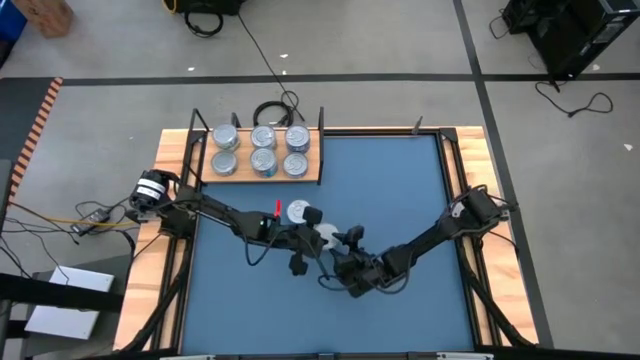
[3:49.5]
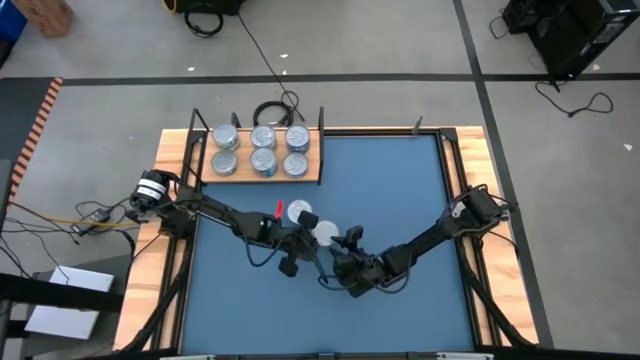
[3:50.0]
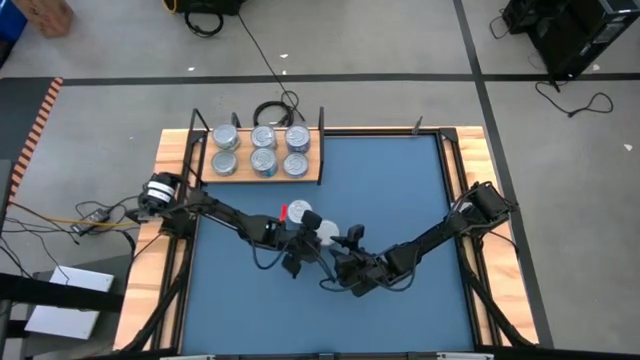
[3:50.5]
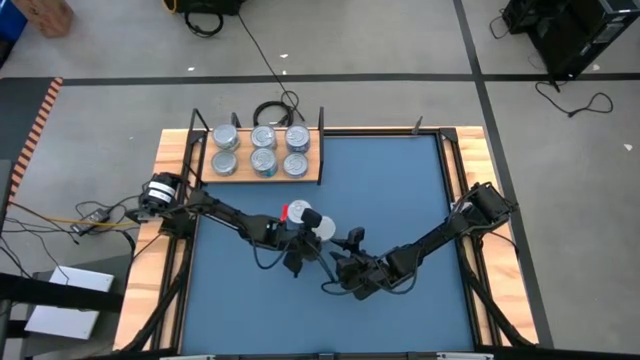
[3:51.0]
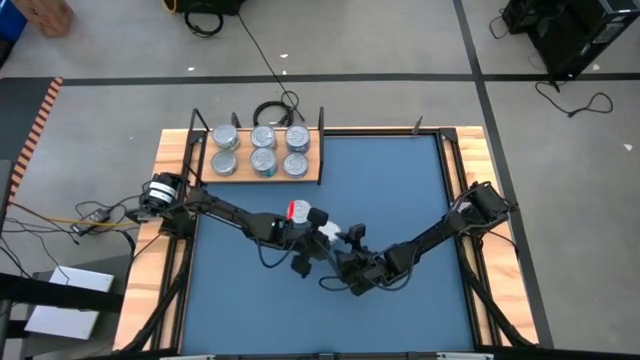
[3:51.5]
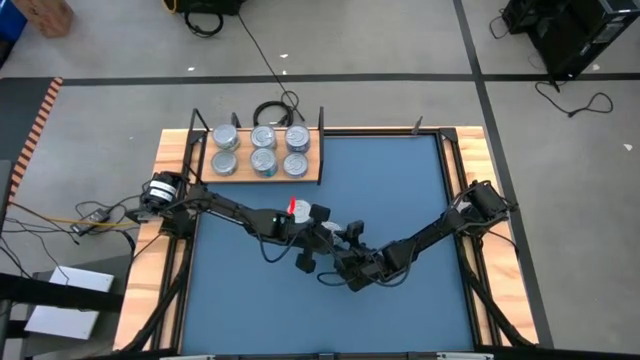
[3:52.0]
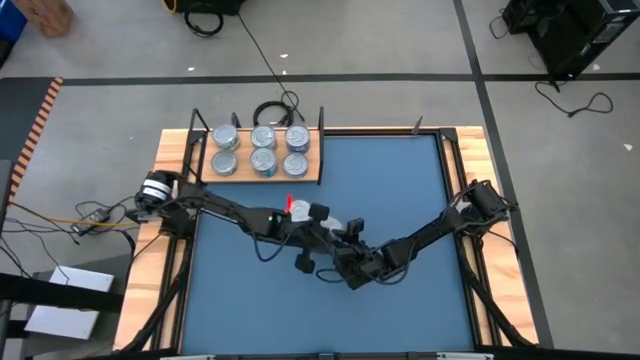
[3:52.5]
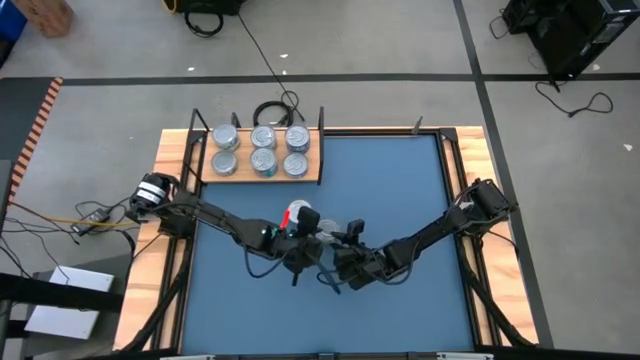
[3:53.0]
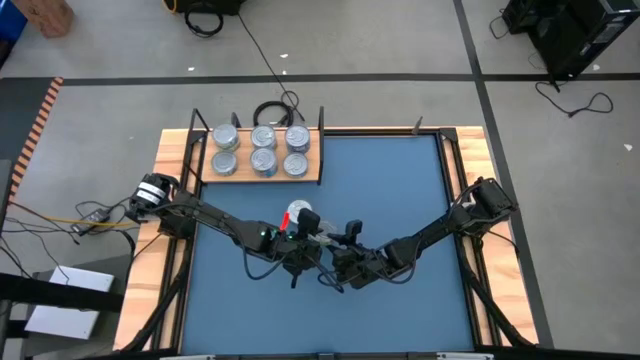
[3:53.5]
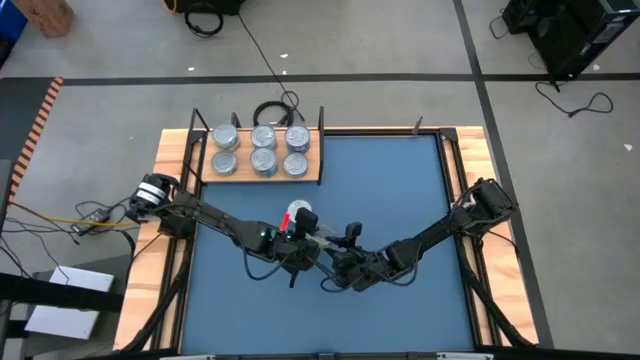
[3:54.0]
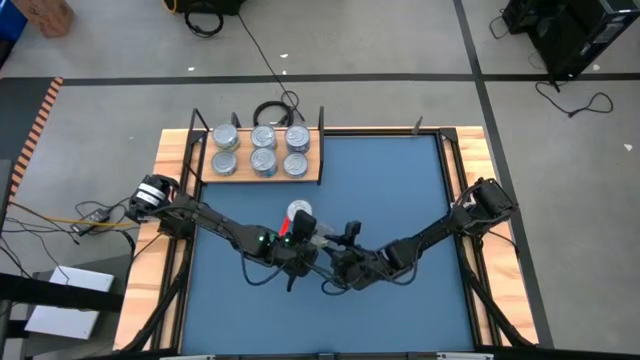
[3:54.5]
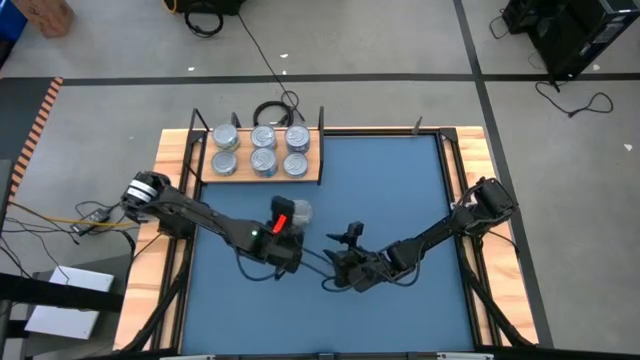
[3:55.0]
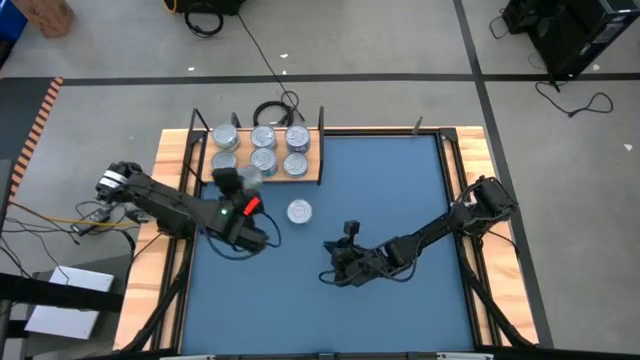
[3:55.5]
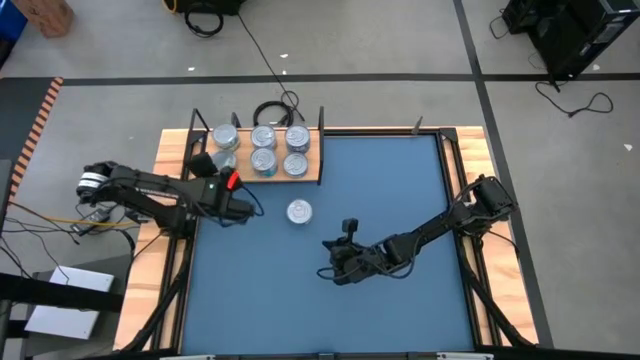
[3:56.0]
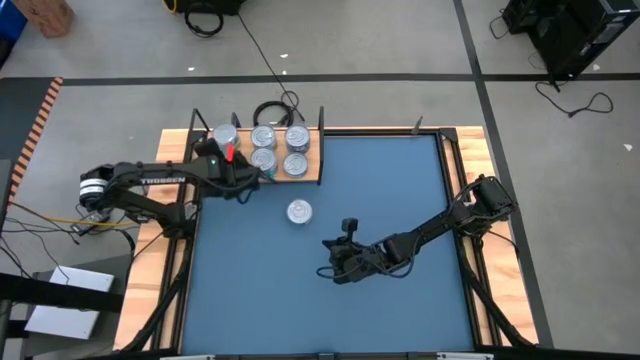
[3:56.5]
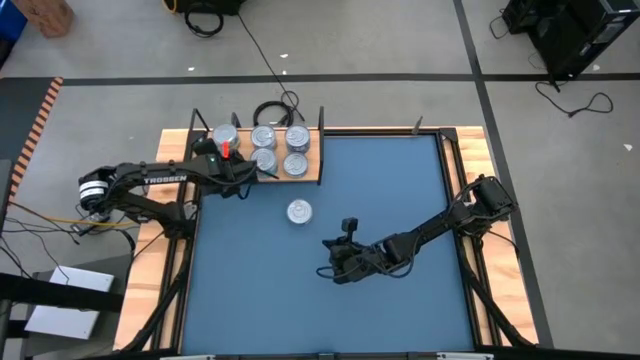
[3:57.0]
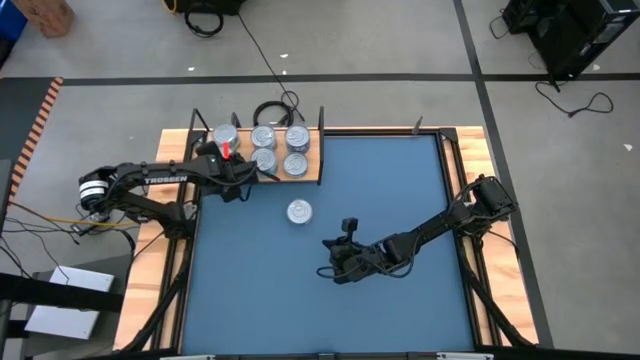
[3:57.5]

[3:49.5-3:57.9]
Task: Stack canned seafood by type on shelf
Stack the green tuna can on top of the other green tuna can on the shelf

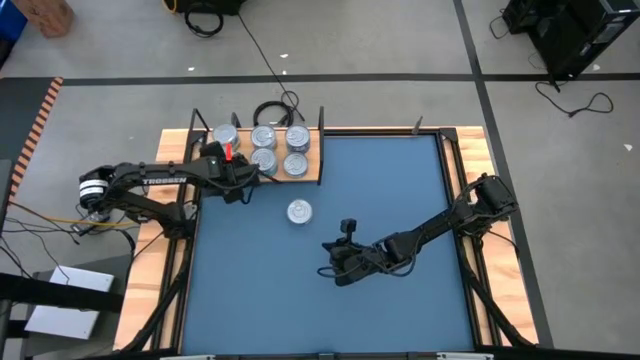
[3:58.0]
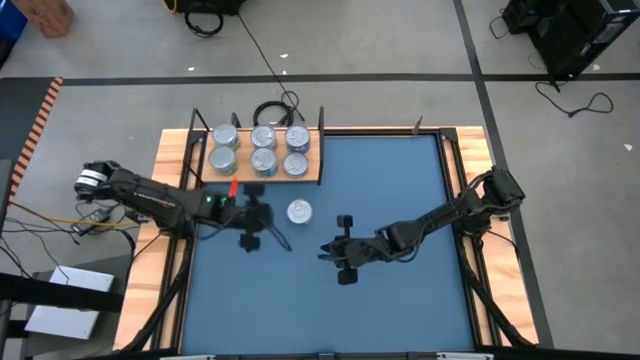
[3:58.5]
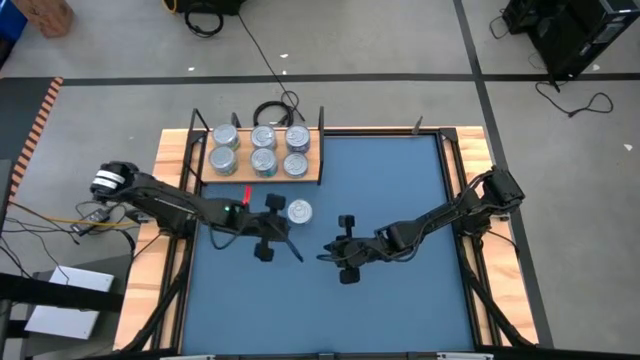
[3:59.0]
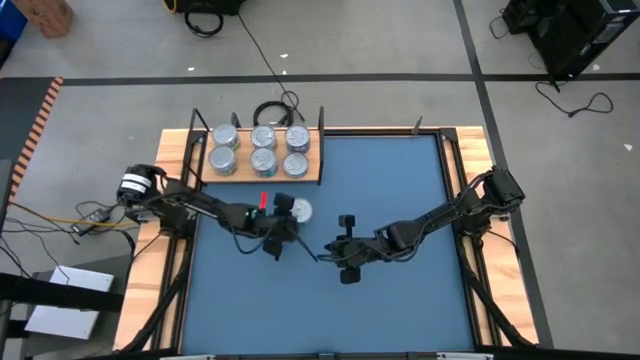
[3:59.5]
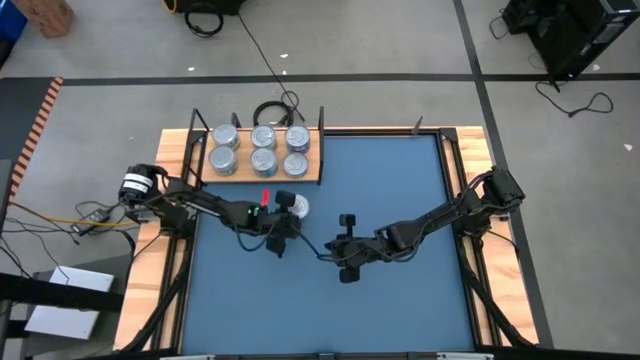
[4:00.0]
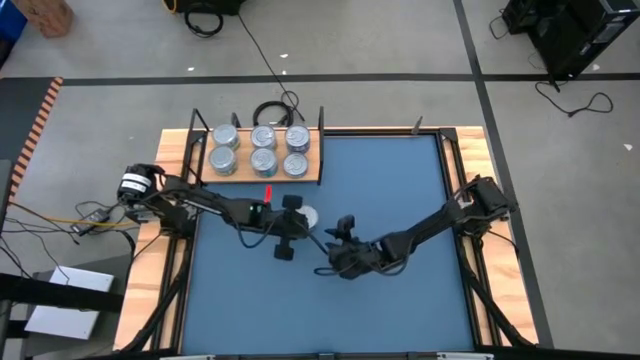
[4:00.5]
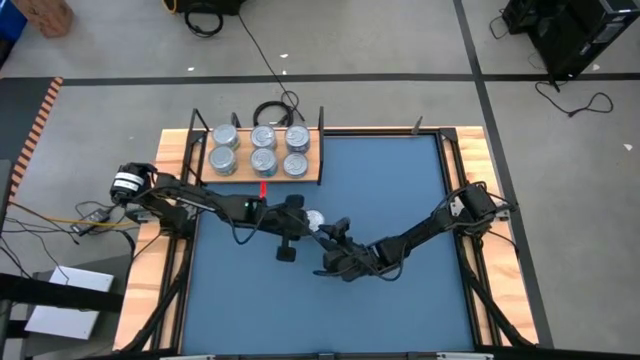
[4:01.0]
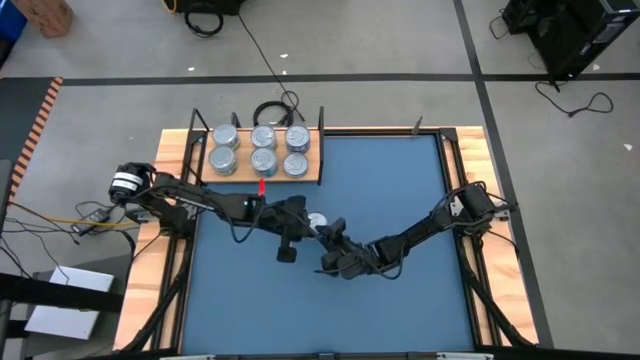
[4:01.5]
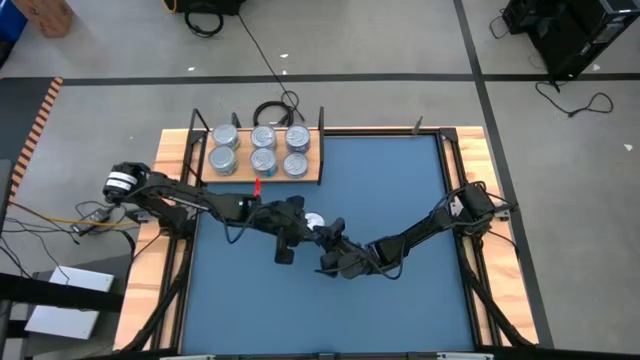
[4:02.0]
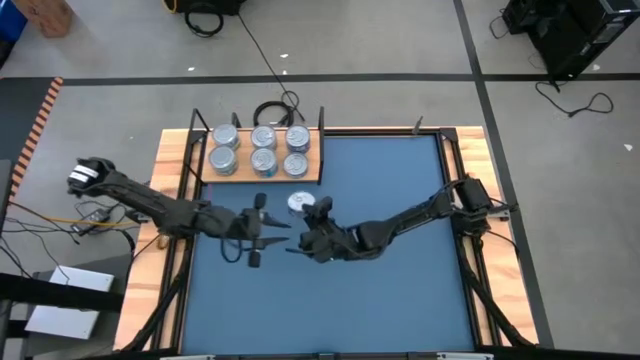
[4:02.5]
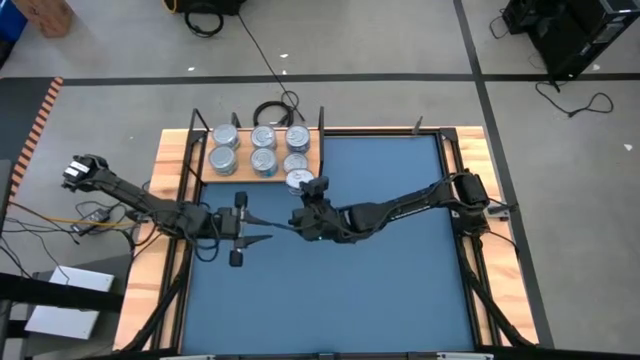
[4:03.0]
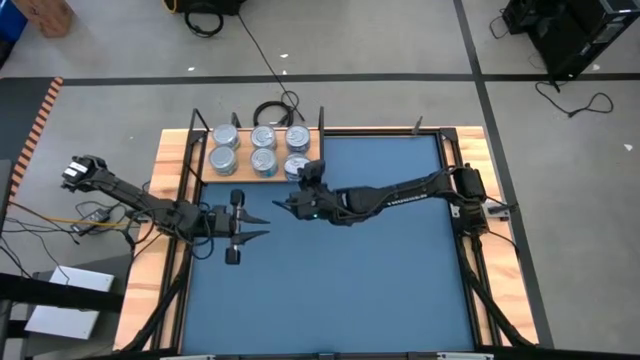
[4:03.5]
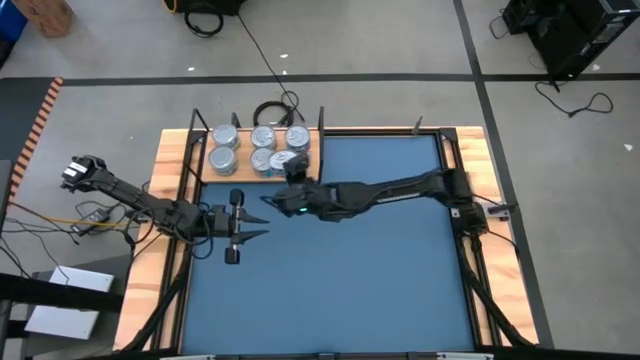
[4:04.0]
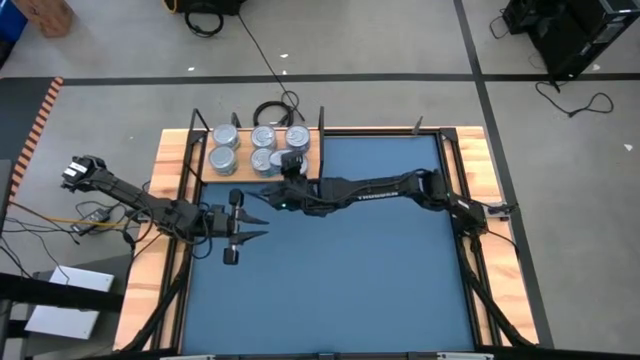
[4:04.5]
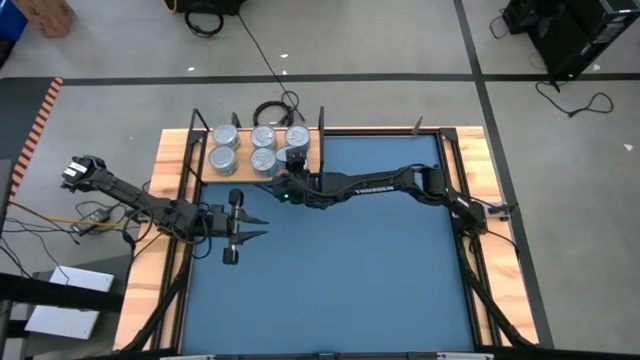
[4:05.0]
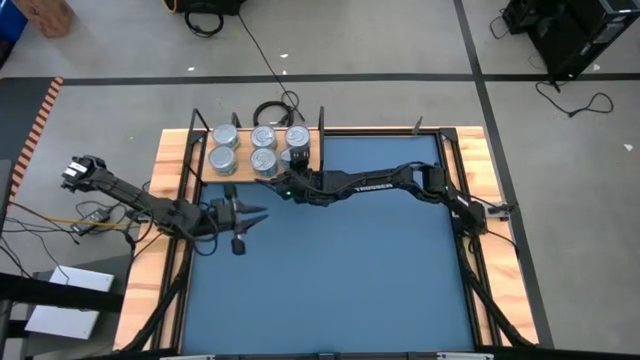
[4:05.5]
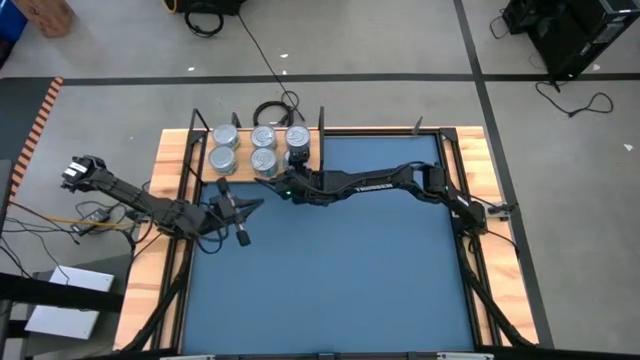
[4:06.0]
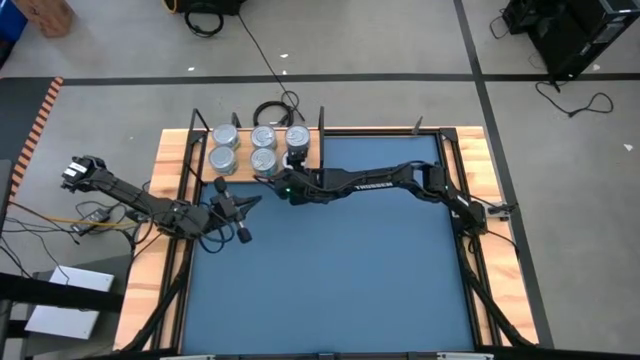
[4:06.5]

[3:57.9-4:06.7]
Stack the blue tuna can on top of the other blue tuna can on the shelf

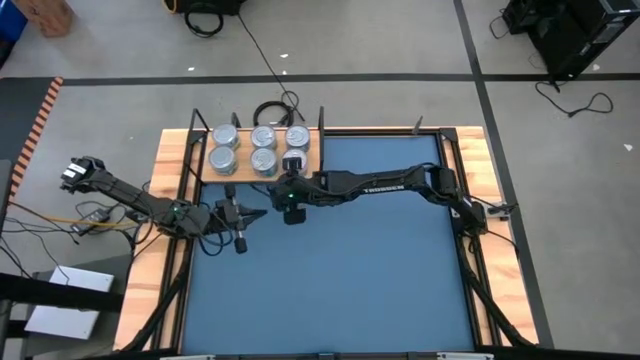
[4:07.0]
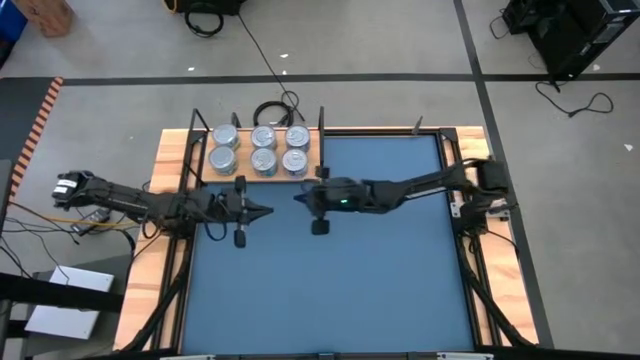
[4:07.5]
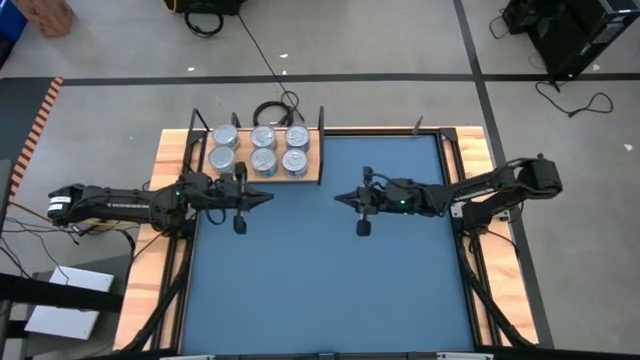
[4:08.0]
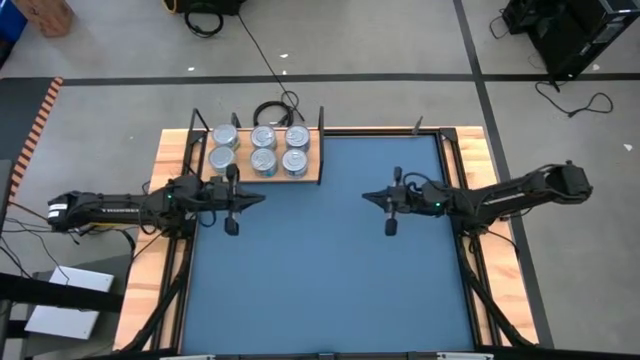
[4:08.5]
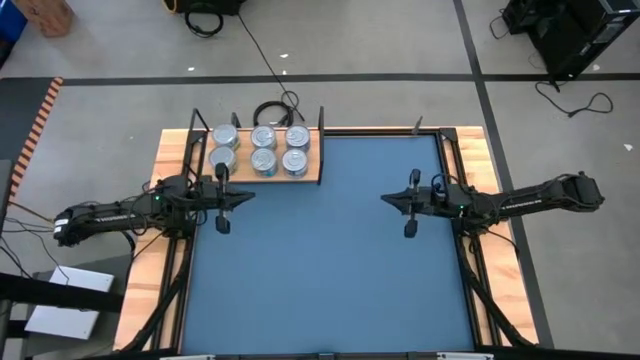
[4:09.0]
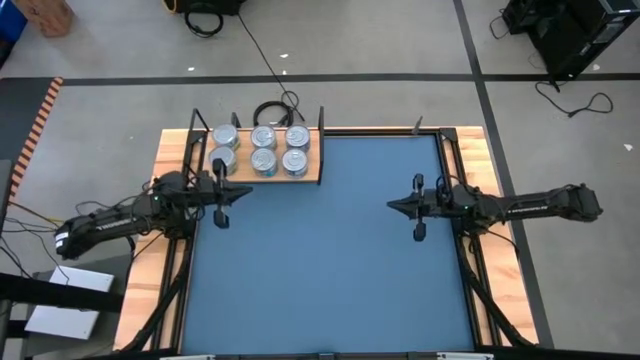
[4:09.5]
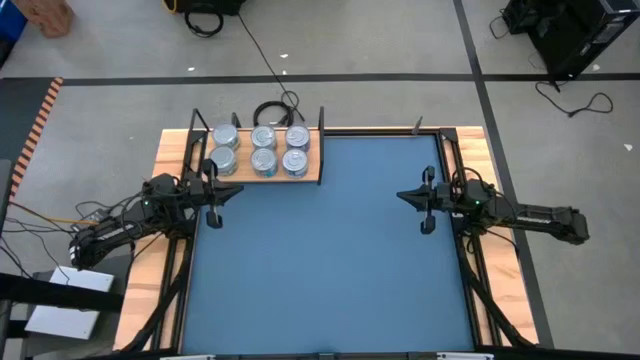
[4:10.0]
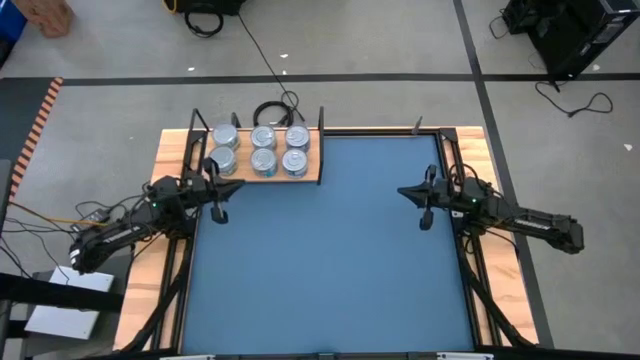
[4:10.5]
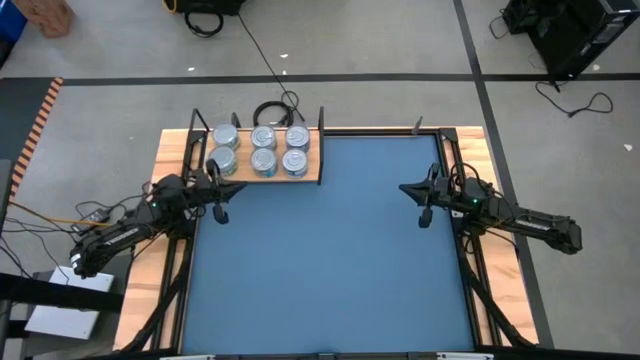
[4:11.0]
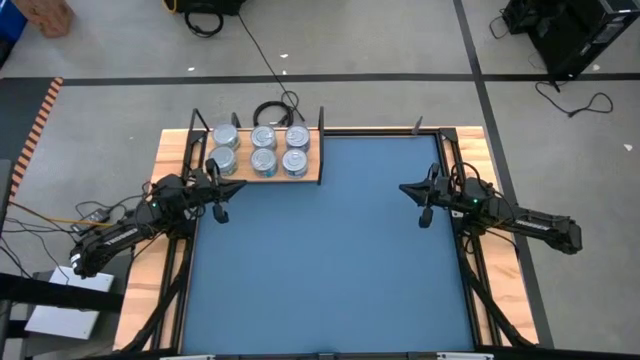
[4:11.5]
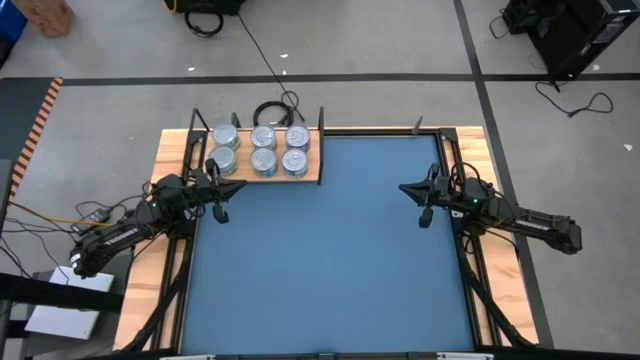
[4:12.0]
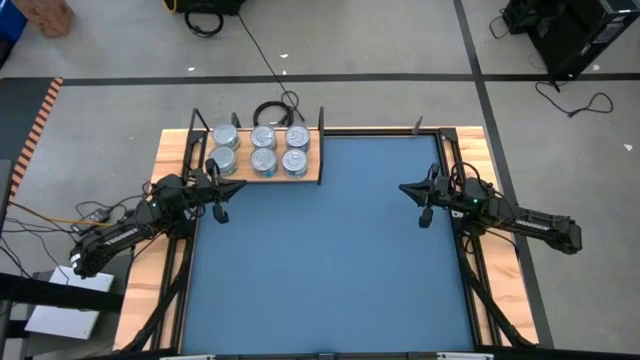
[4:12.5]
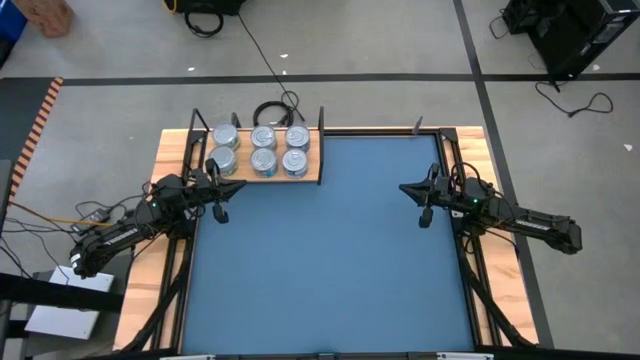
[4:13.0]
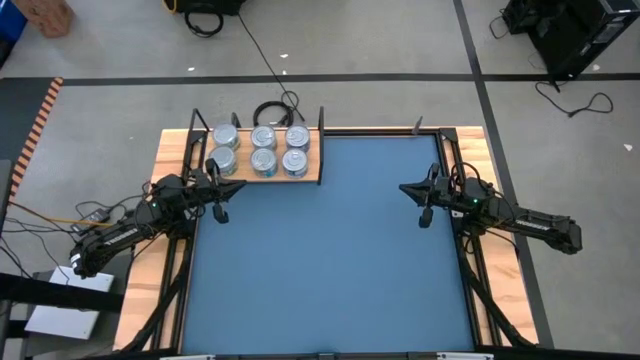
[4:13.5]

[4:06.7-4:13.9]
Return to Home Position
